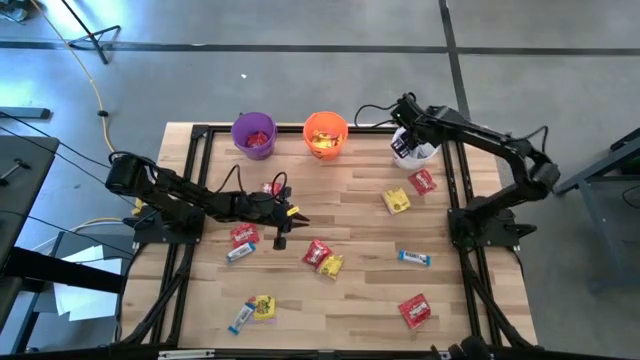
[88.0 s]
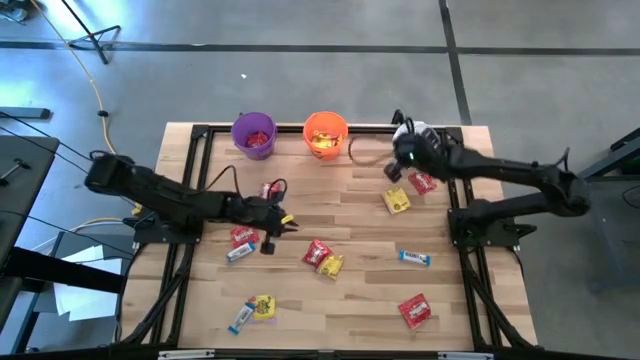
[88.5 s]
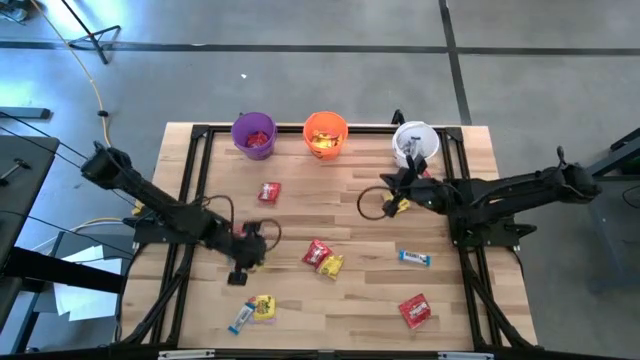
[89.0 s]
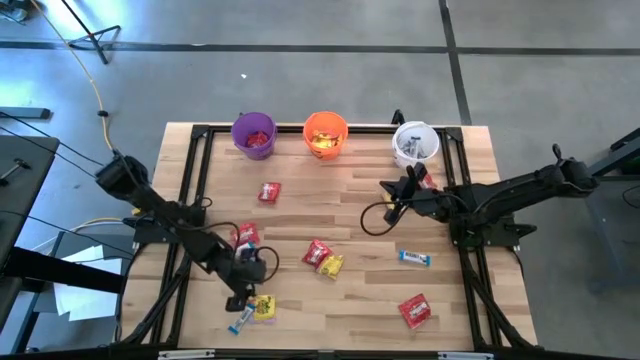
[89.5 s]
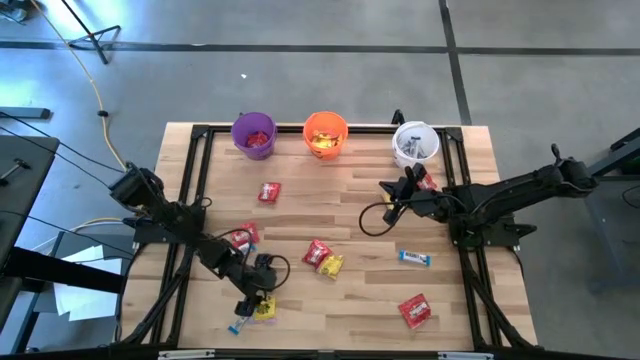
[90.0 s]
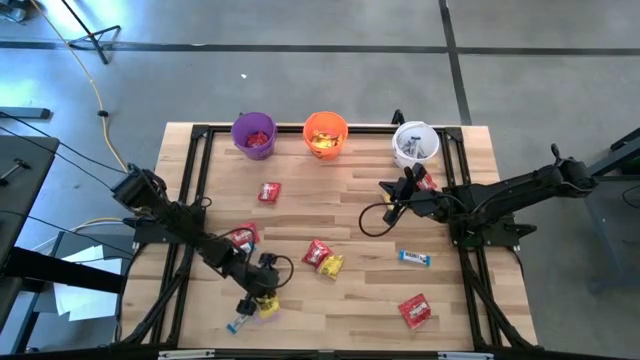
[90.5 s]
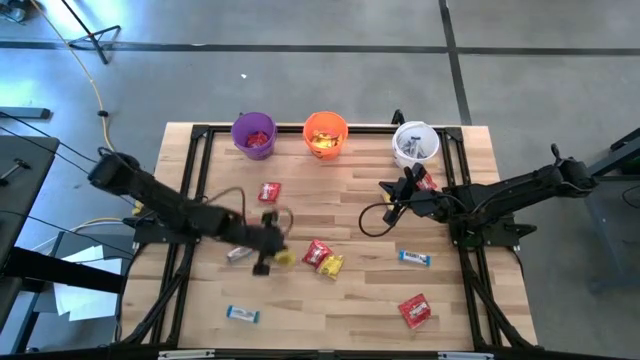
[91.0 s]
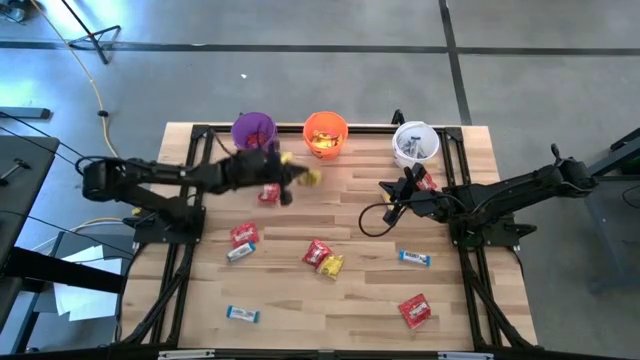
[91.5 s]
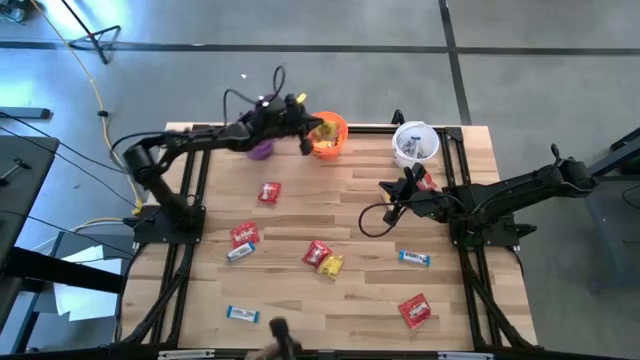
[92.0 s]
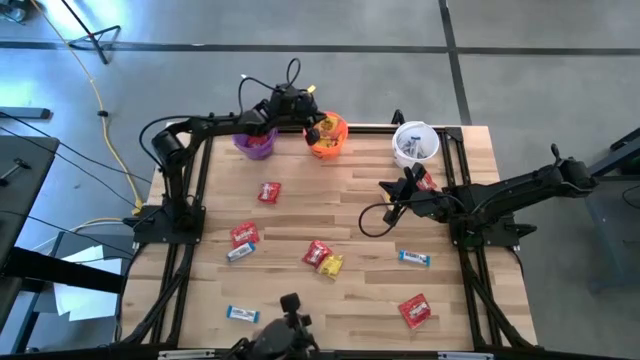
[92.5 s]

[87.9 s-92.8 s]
Task: Sort candy
Put the yellow candy into the orange bucket

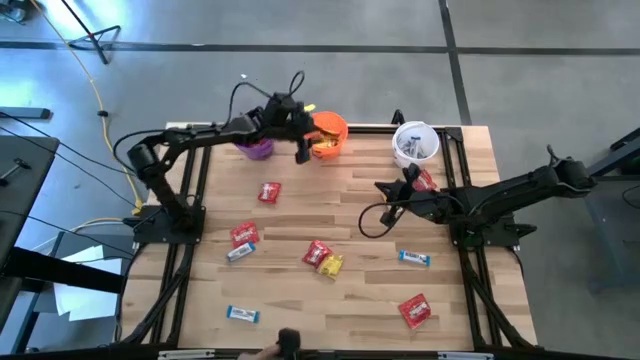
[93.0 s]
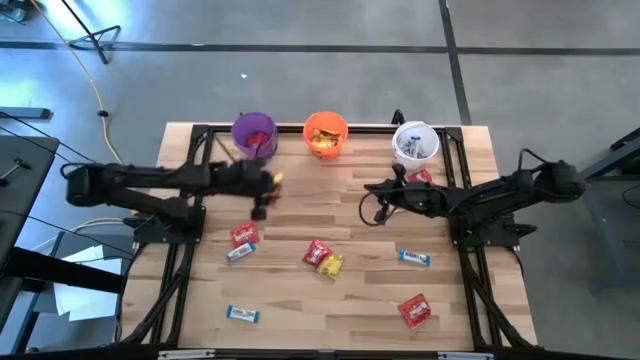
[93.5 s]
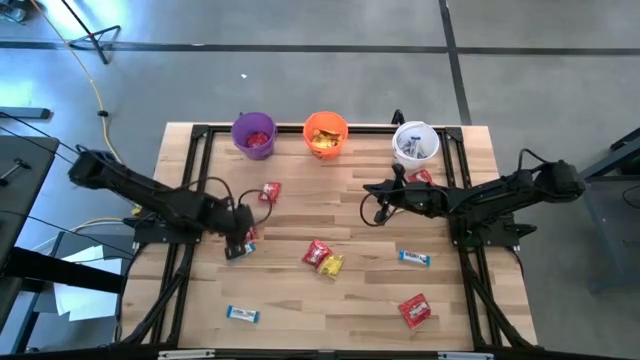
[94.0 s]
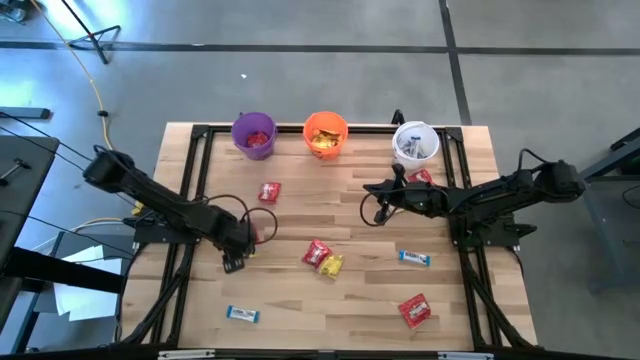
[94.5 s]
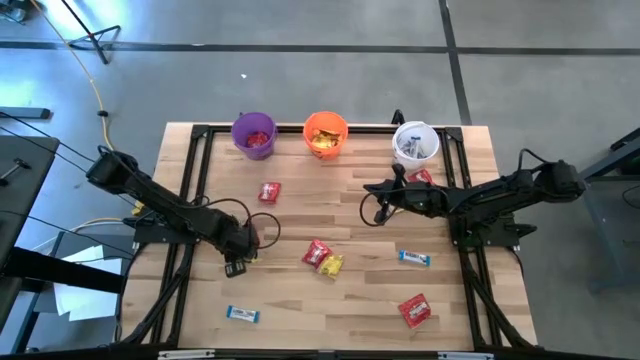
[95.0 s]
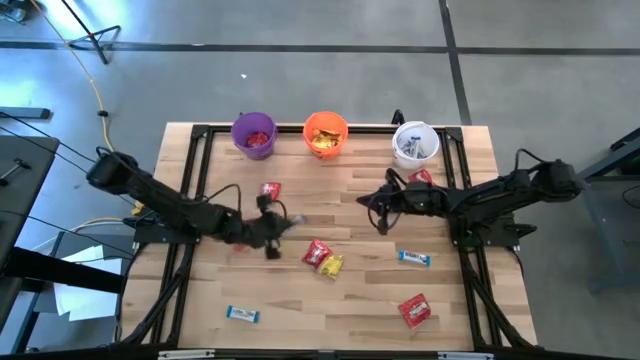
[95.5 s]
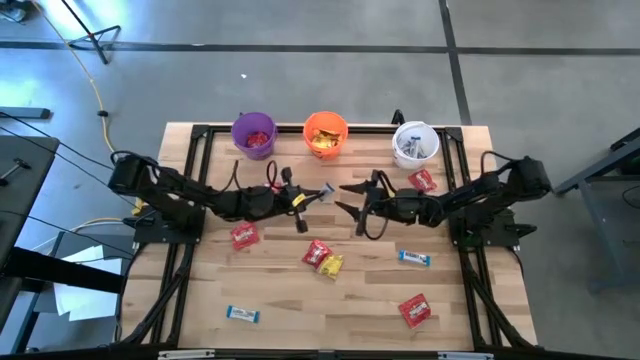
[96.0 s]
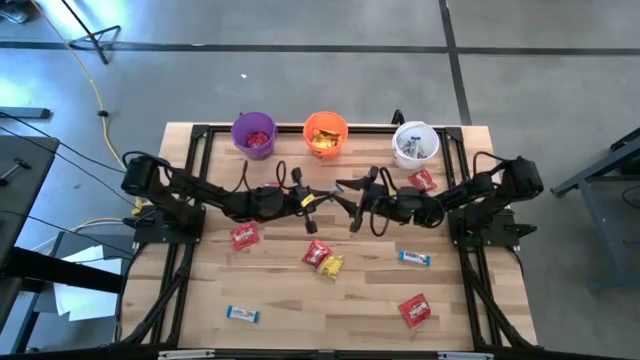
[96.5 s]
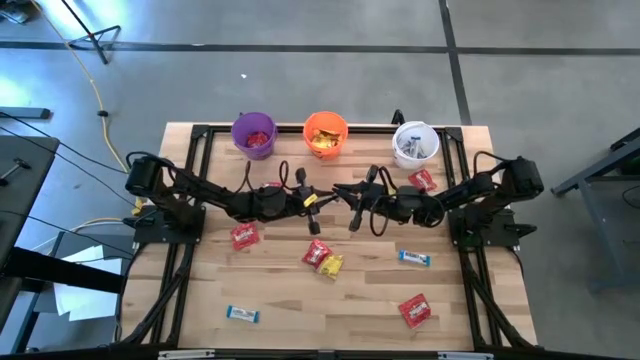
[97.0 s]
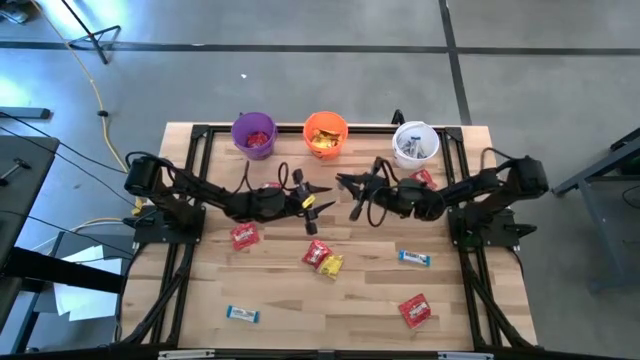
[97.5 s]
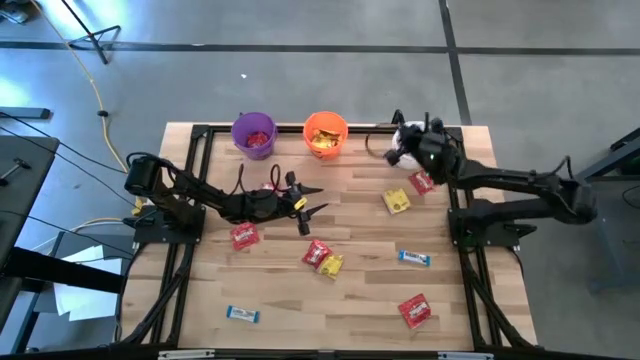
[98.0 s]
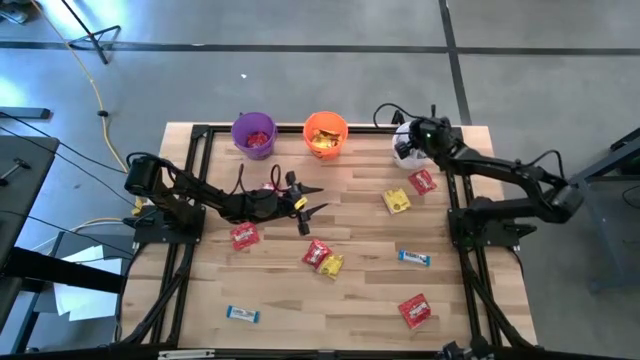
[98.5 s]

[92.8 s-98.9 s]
Put the white chocolate bar into the white bucket

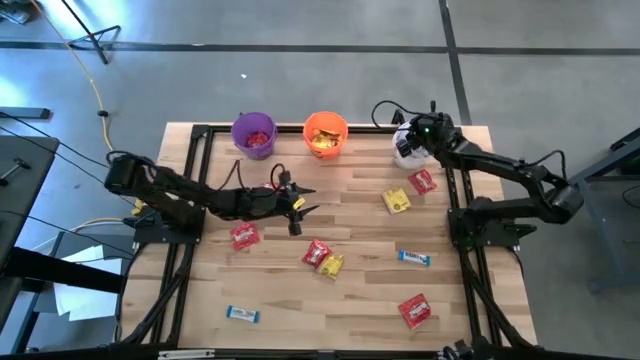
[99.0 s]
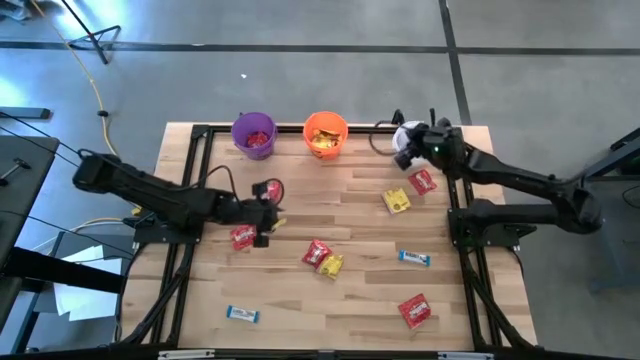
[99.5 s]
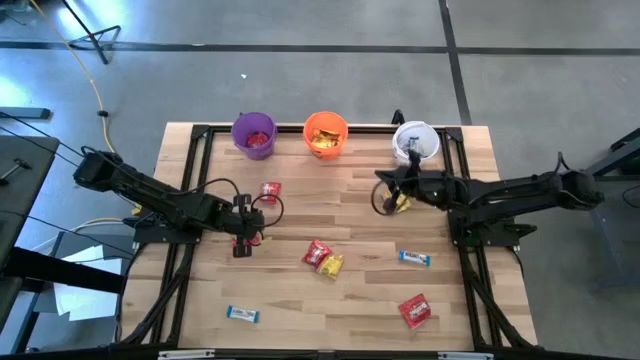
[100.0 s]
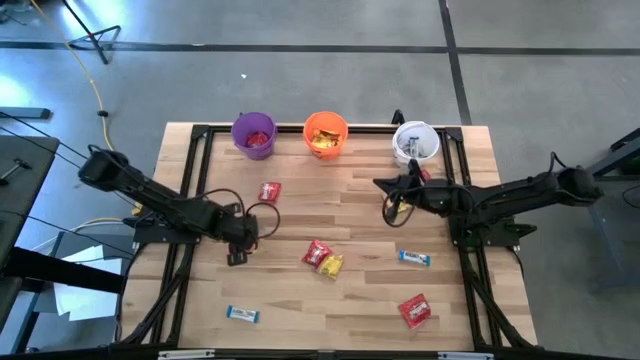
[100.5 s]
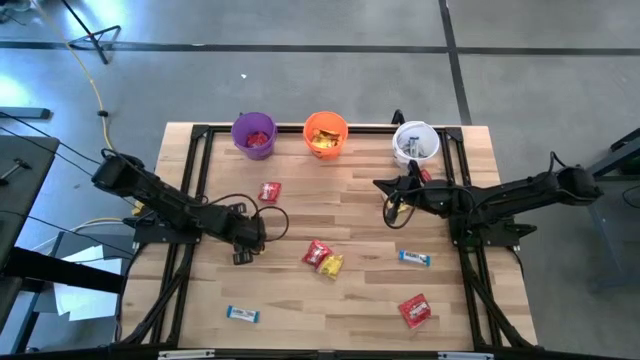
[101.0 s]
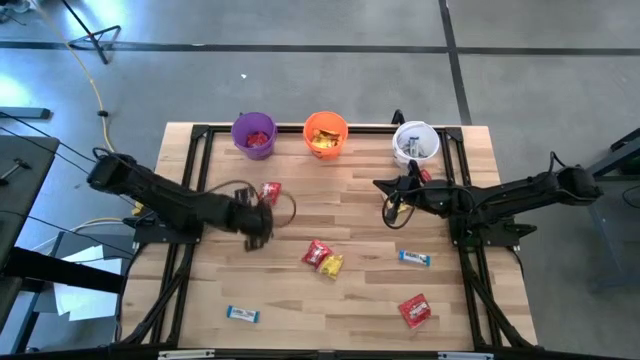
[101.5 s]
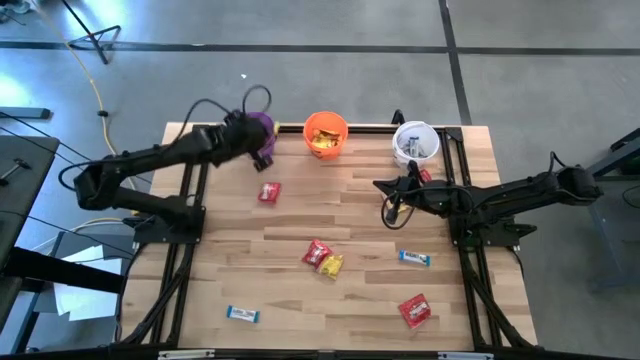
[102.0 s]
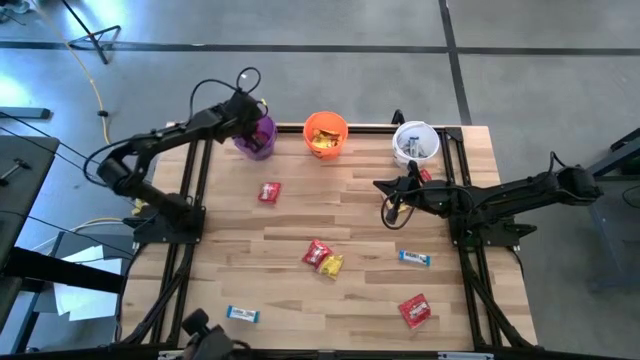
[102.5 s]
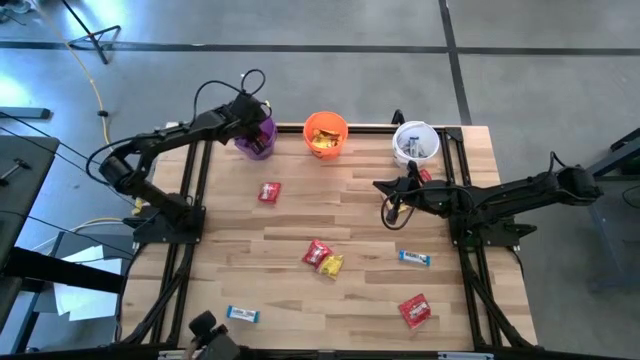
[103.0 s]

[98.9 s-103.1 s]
Put the red candy into the violet bucket

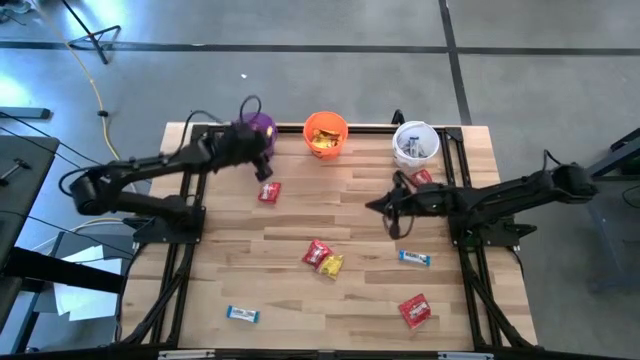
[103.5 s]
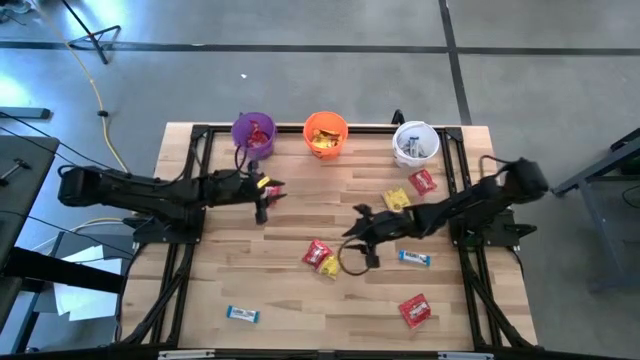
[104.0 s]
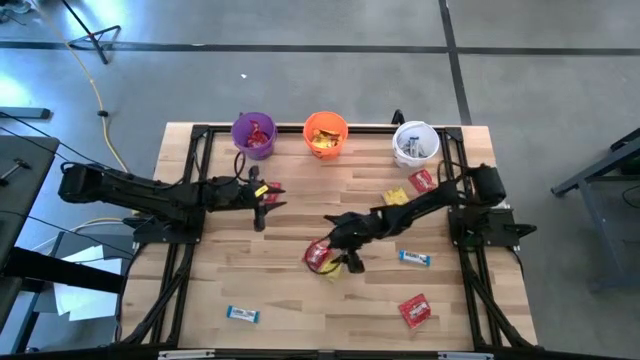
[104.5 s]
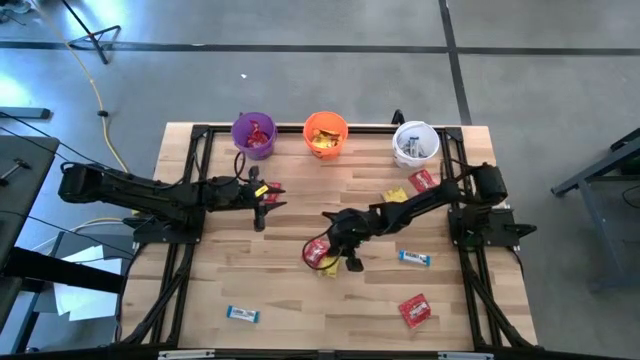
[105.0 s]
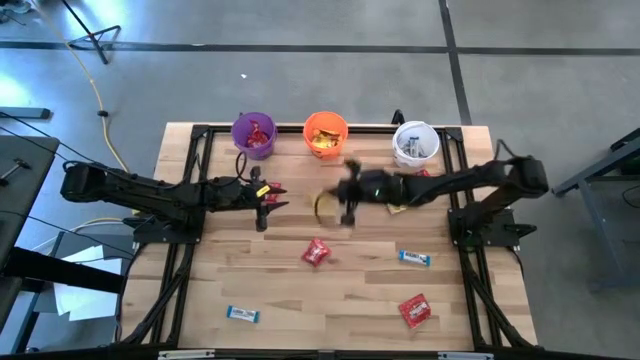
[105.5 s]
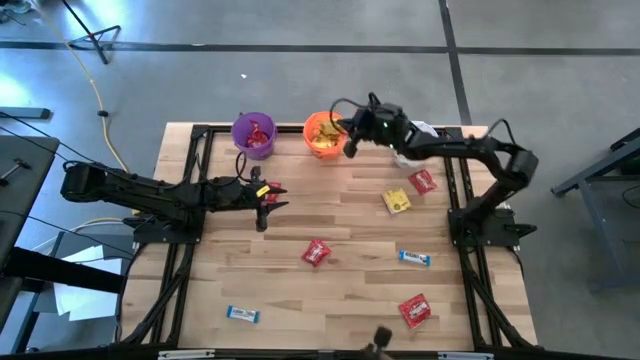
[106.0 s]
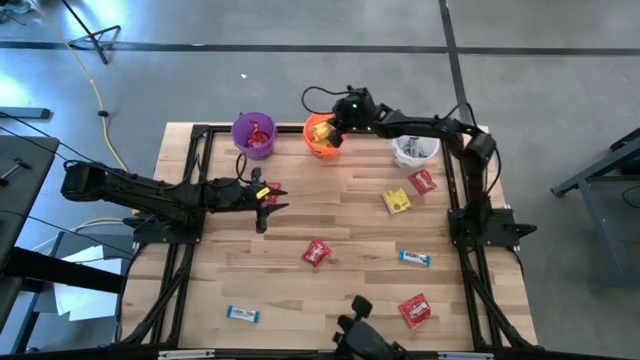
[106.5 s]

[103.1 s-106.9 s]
Put the yellow candy into the orange bucket

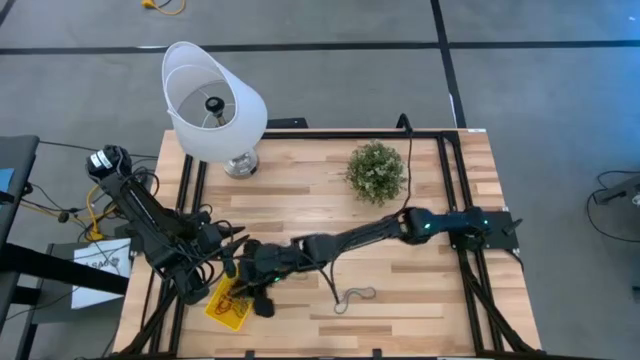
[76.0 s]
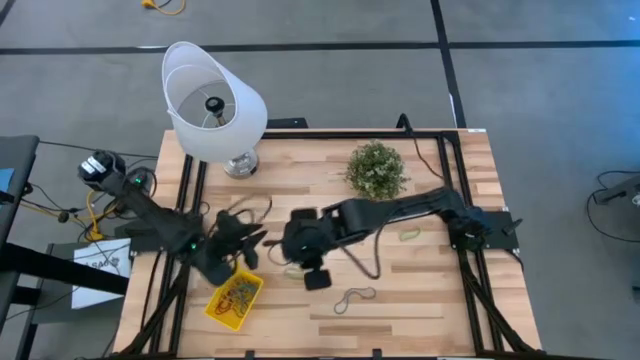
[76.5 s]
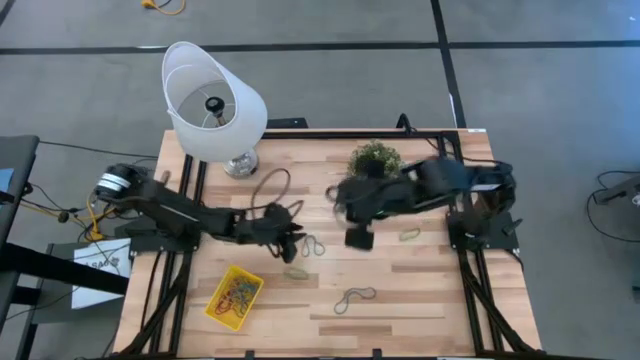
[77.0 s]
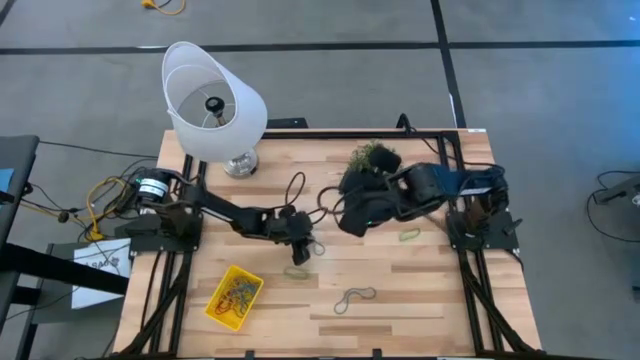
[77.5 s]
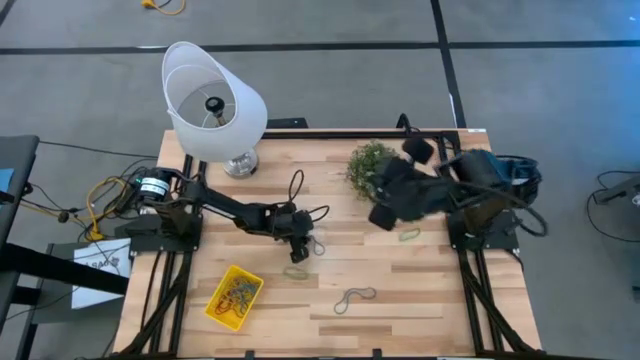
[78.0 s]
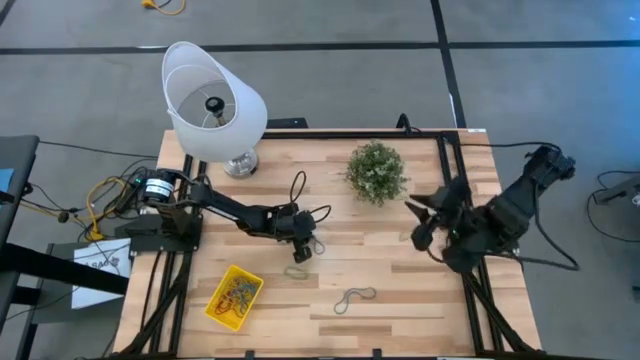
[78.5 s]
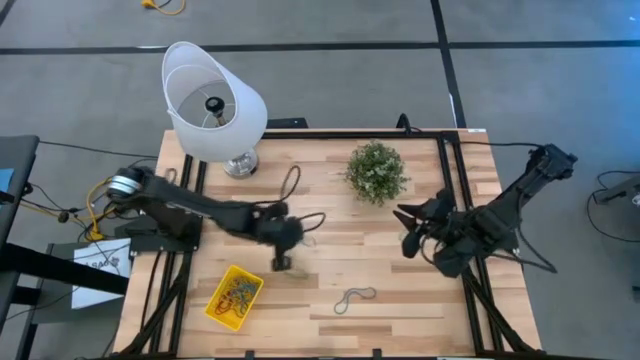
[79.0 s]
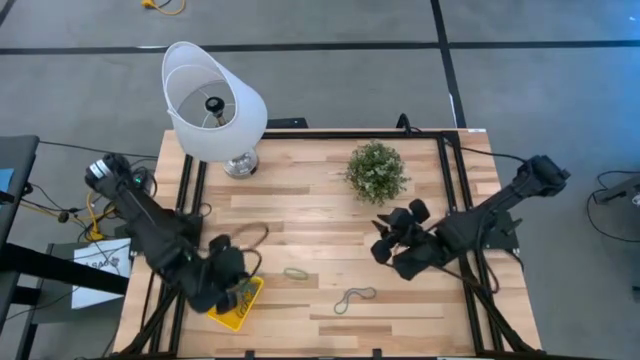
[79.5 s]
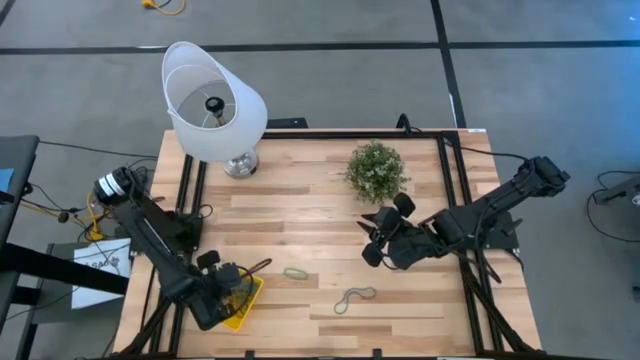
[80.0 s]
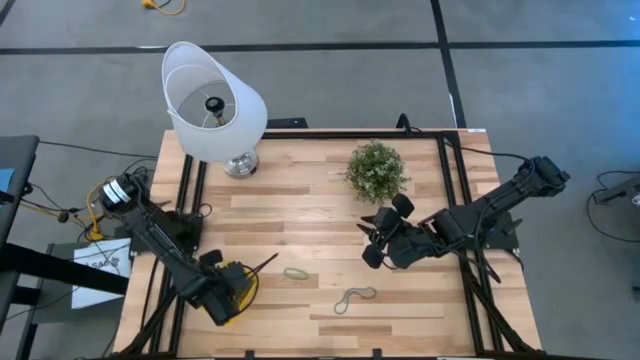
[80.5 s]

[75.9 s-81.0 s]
Task: Pick and place items into bin
Put the top blue rubberband into the yellow bin
